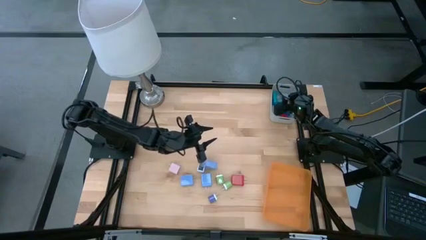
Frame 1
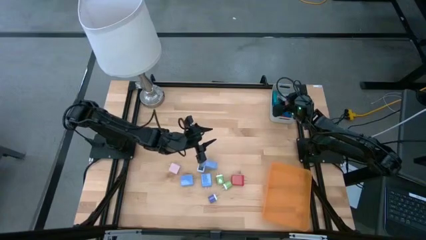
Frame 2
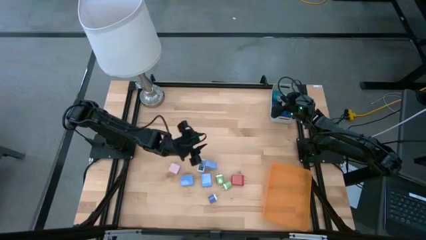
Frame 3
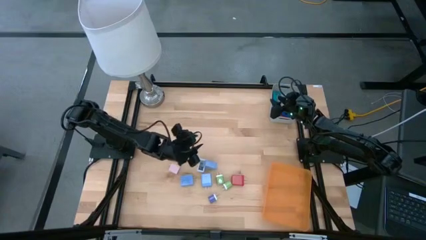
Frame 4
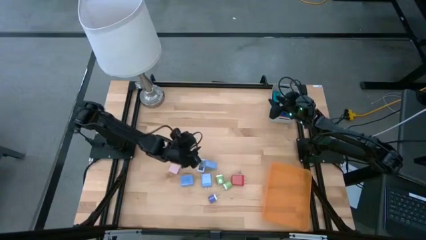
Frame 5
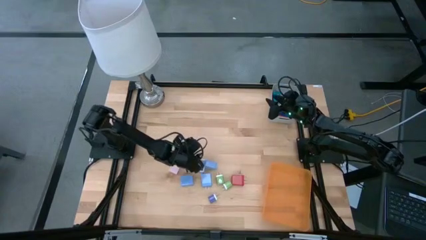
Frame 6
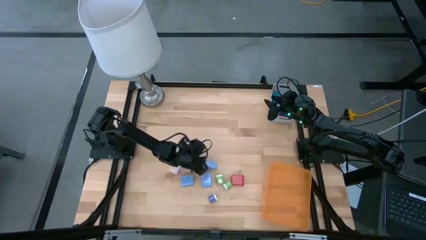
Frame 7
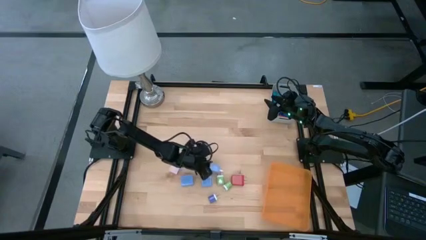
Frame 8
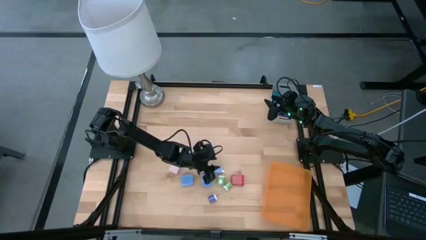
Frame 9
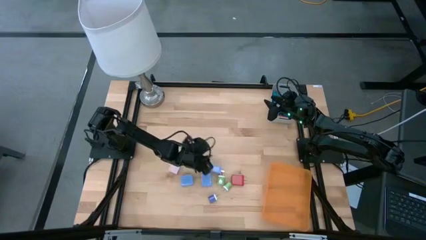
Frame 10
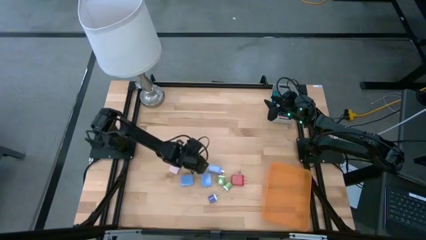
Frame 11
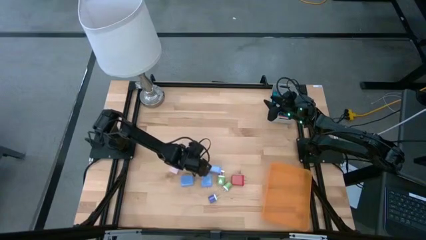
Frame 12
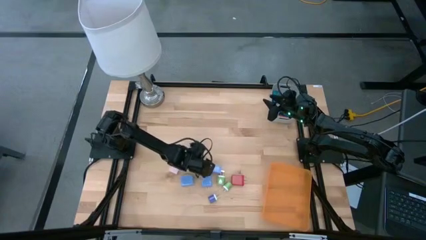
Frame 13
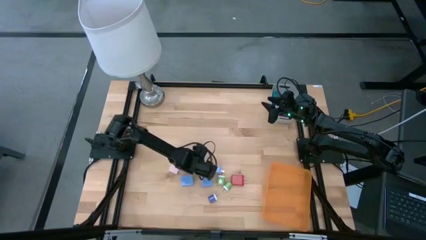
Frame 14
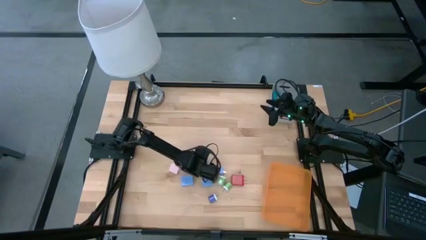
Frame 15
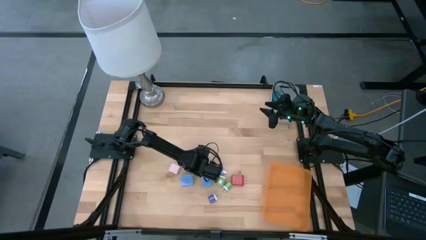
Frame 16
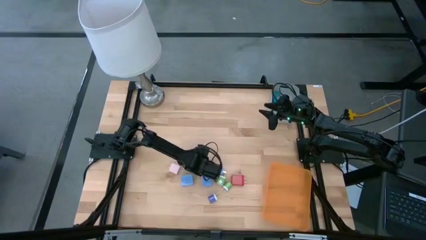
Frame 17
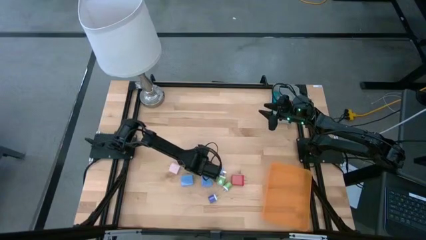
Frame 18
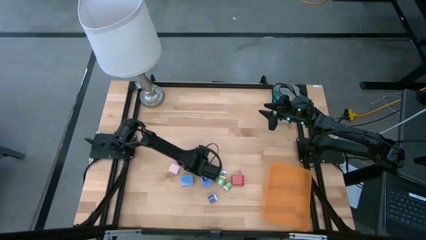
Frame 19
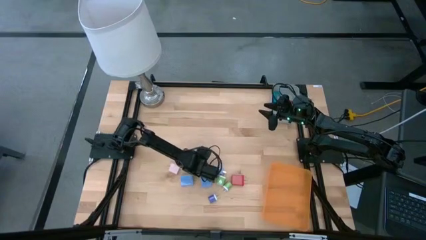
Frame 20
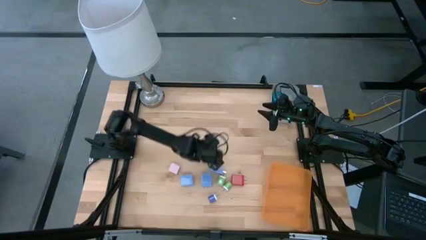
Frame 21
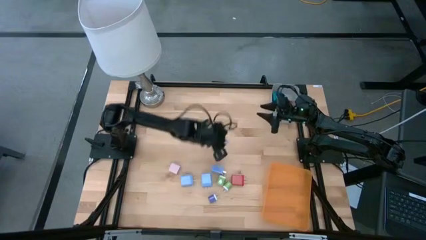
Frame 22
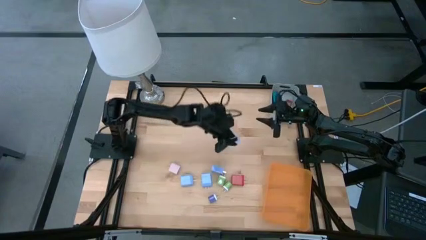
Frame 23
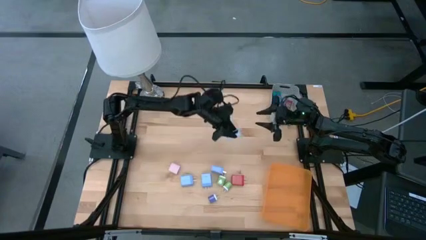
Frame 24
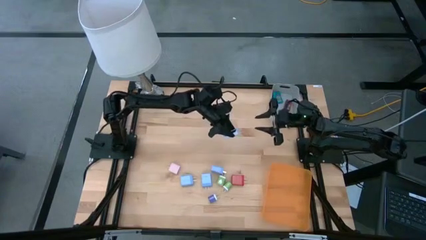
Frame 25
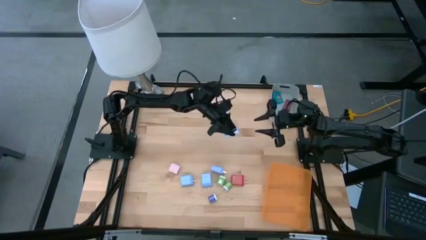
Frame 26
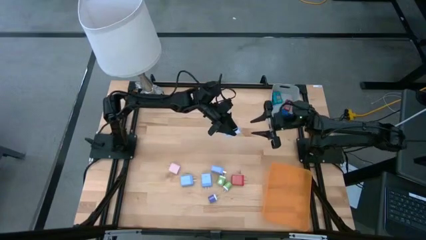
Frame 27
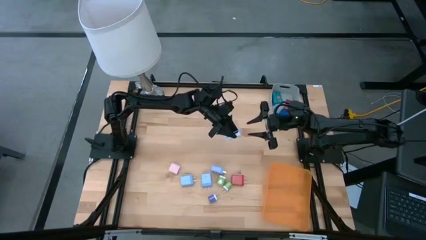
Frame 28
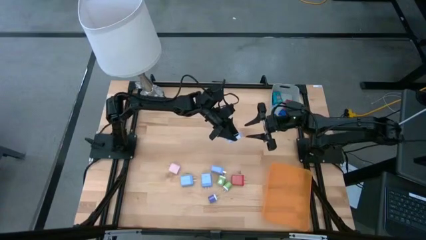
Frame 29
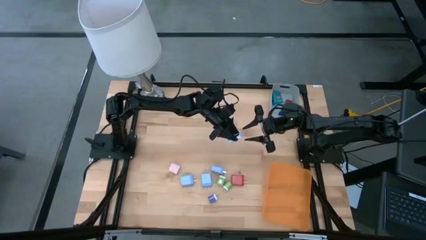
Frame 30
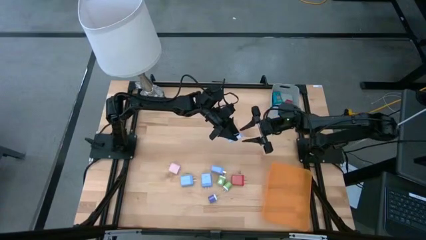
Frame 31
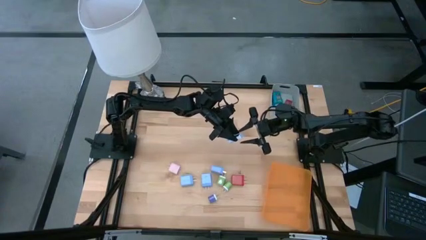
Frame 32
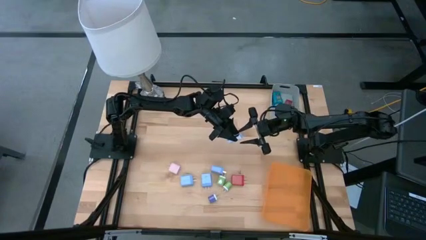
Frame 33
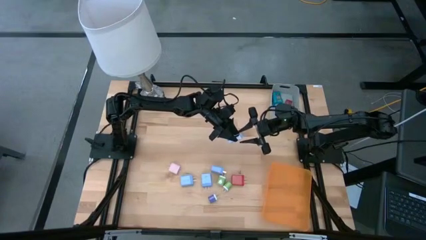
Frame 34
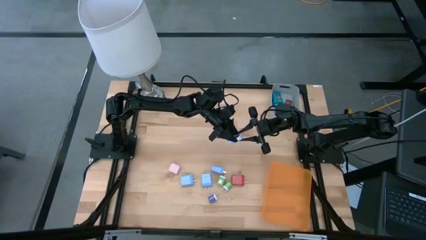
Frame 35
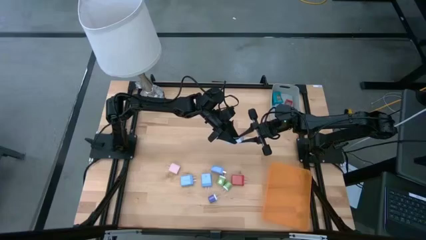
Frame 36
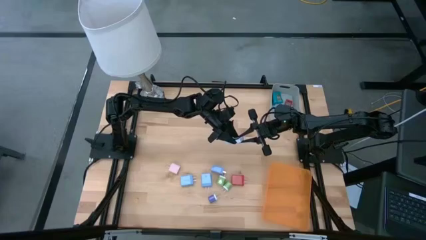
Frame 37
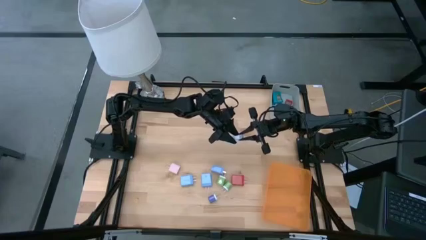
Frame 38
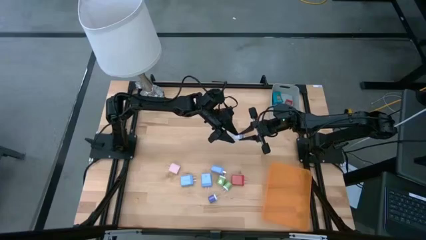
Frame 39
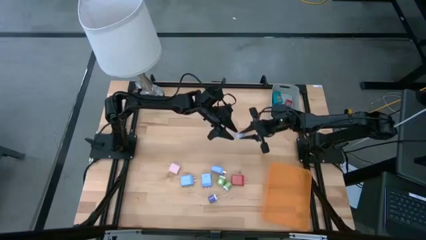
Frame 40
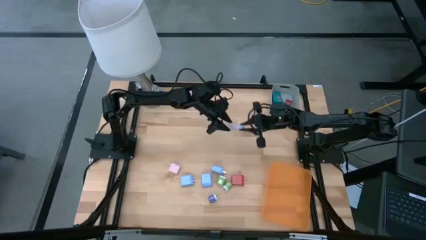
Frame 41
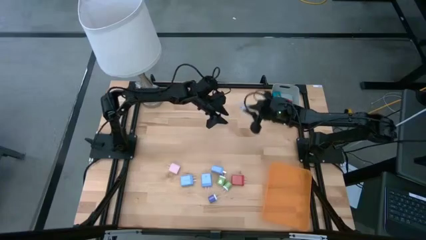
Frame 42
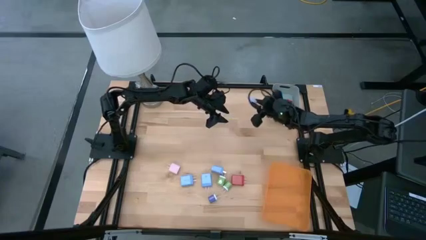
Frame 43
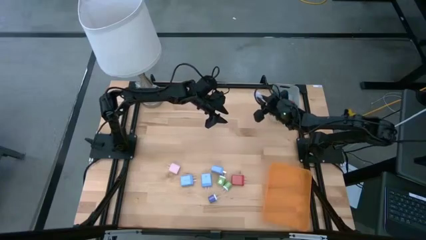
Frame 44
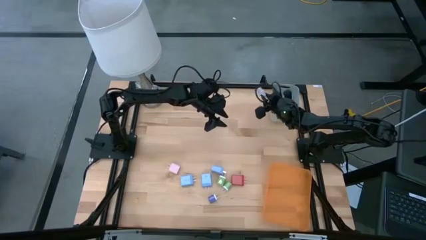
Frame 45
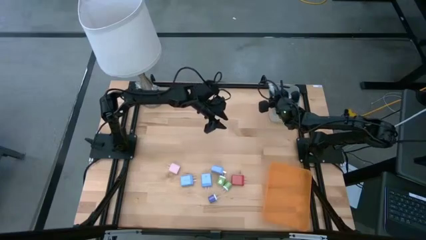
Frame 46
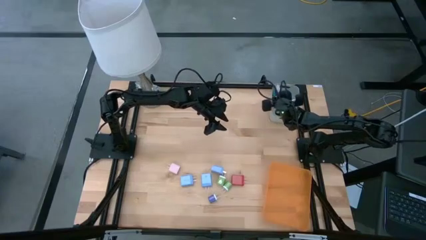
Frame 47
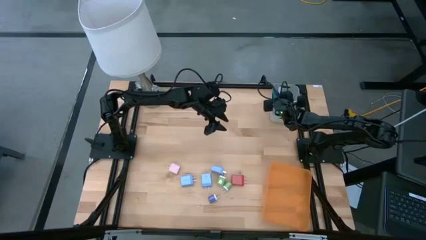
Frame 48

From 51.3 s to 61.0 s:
Task: Pick & Place Office items
Put the white digital clock into the gray bin

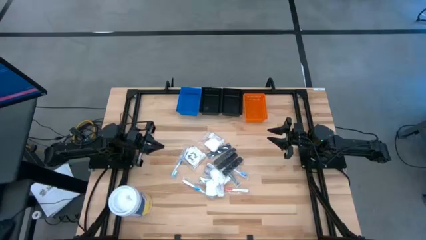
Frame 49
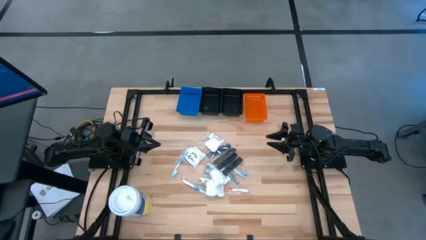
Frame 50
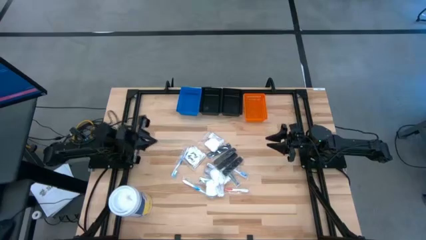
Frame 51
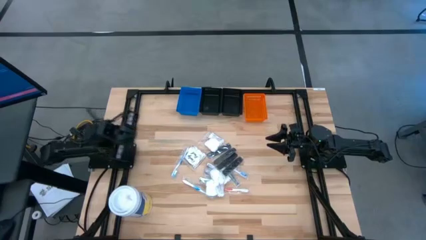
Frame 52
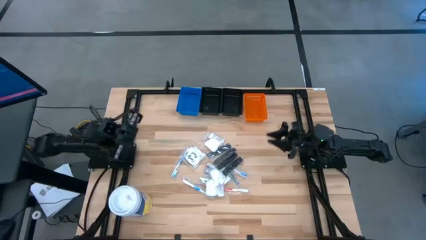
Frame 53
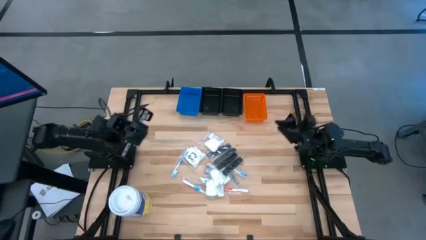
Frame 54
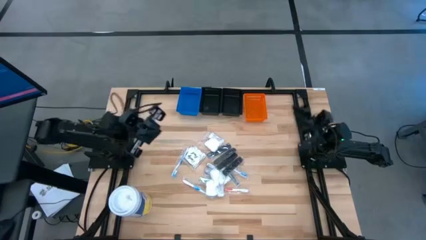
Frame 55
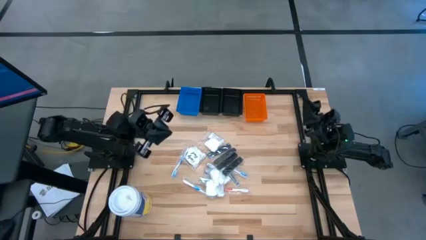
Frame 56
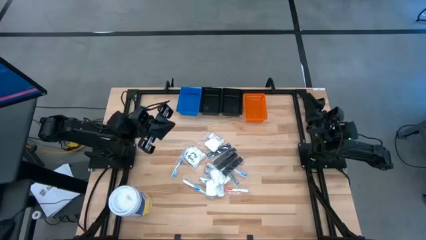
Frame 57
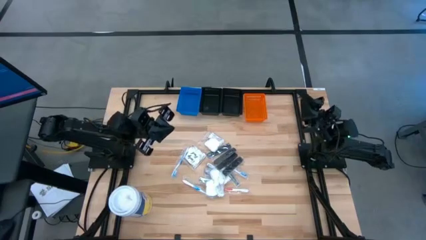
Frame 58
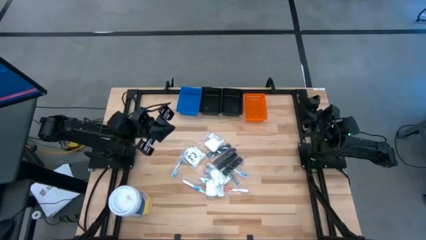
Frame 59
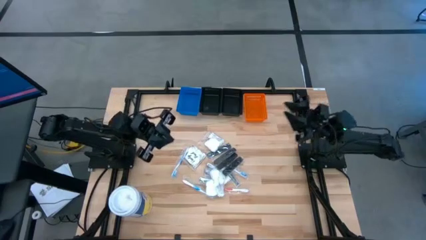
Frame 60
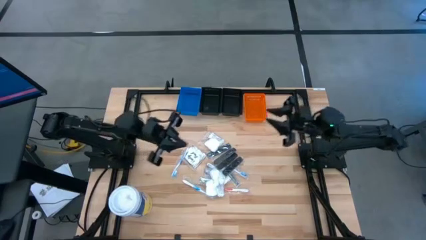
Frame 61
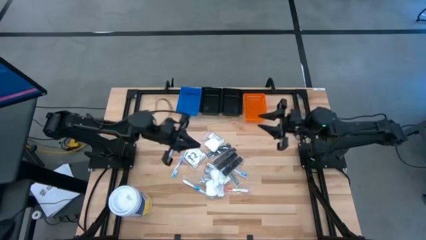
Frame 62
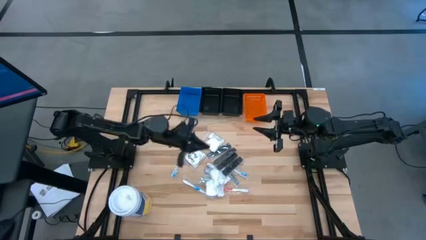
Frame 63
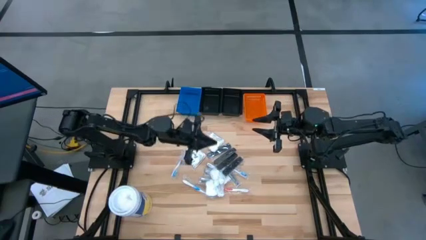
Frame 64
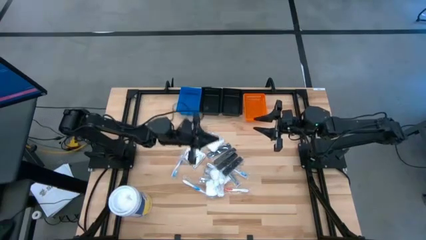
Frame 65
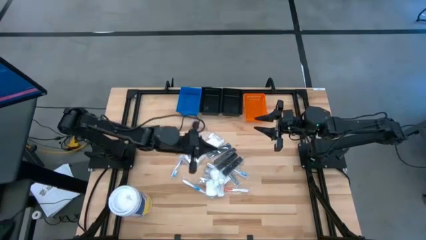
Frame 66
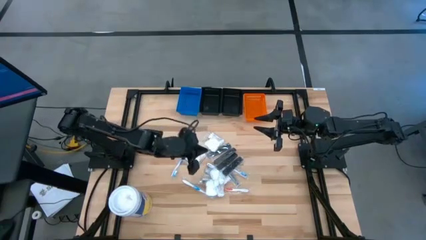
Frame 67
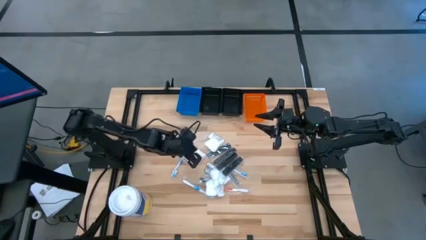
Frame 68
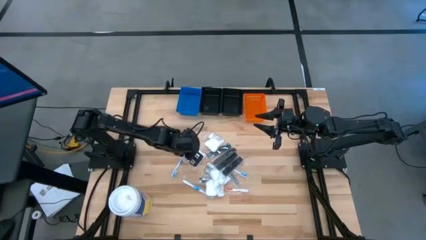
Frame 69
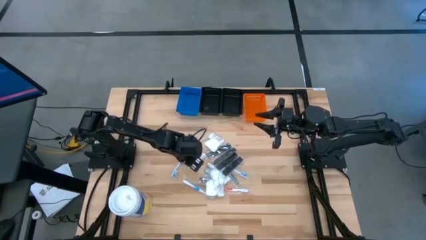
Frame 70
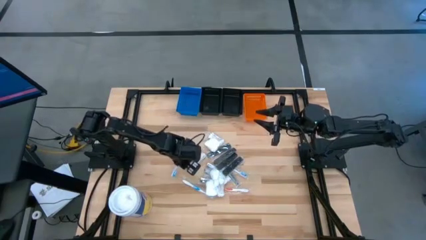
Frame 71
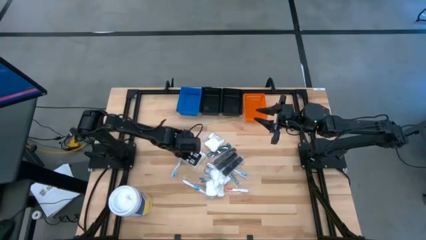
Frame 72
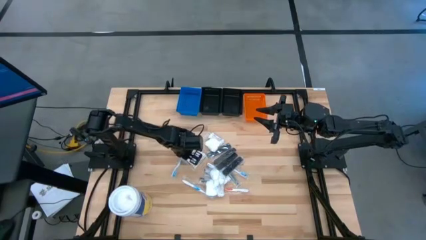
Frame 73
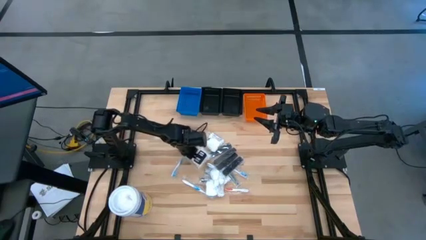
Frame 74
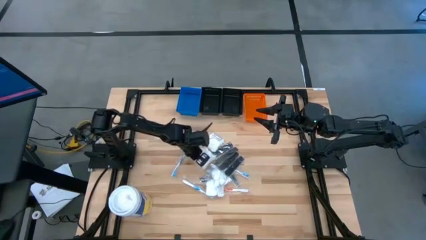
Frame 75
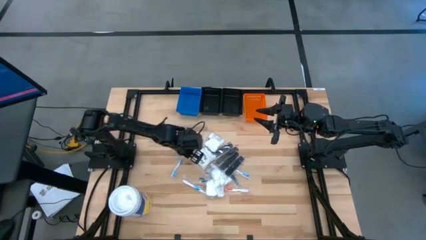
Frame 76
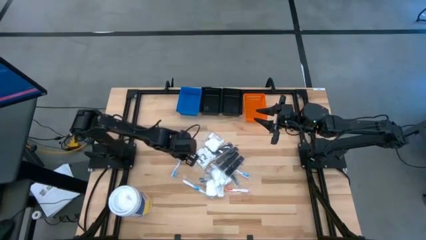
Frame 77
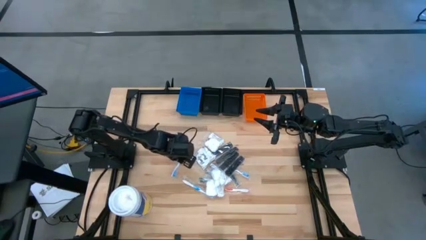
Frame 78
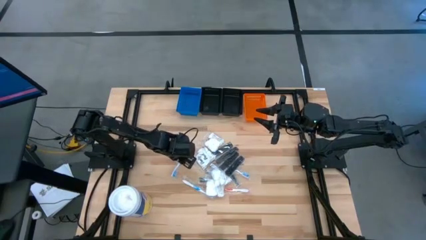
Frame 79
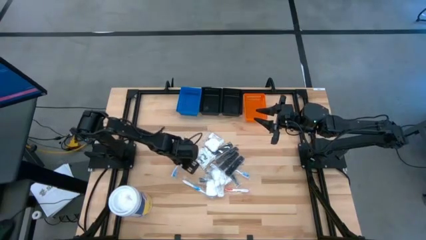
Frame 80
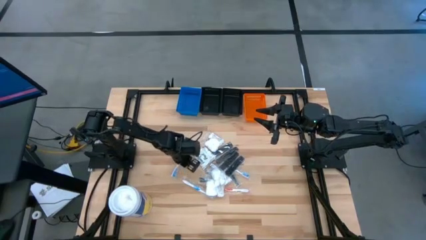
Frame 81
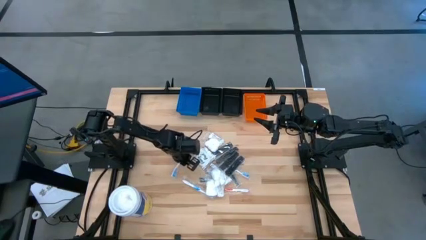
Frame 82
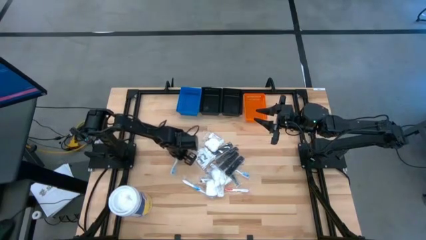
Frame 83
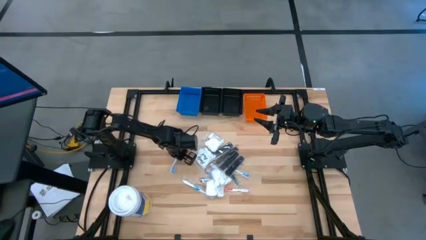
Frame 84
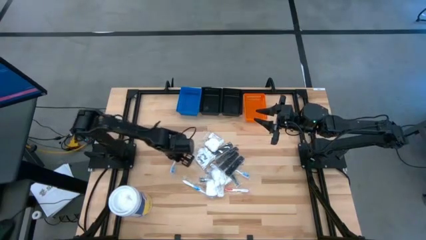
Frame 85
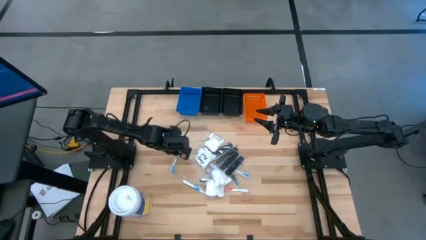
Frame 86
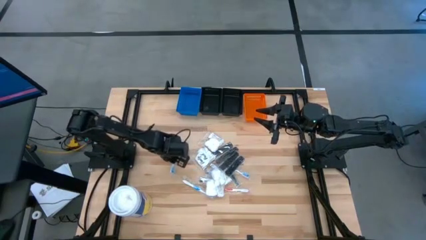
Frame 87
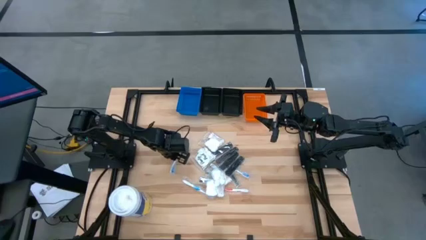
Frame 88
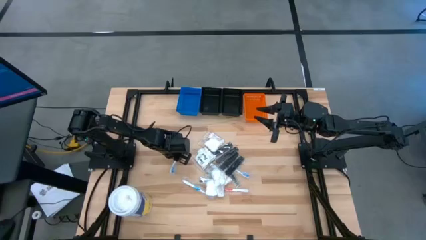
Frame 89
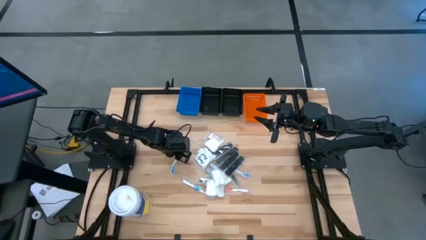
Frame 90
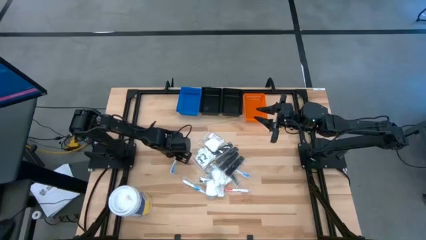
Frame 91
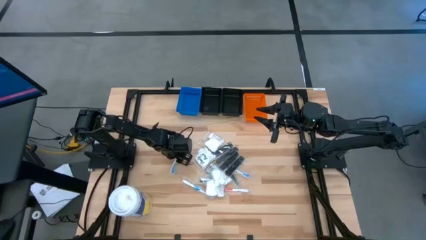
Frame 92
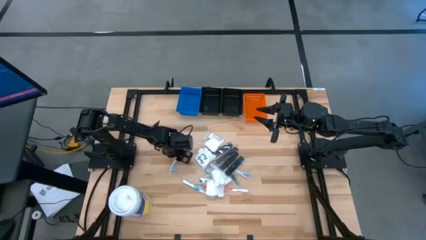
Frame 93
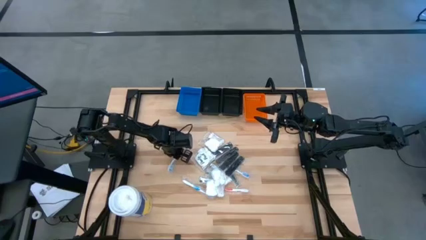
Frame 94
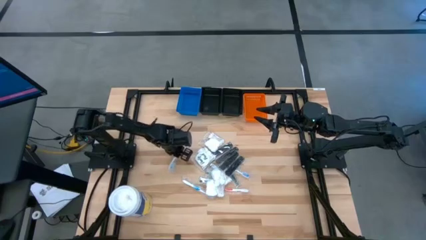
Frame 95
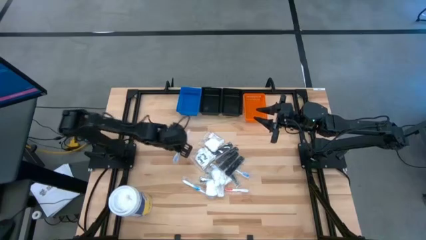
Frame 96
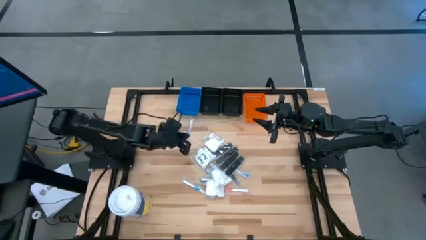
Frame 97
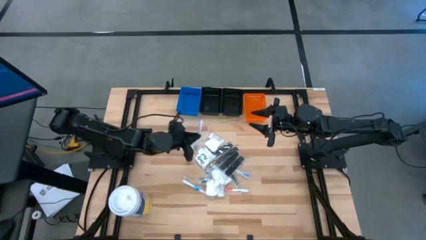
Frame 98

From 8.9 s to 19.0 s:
Task: Pick & Place Travel size toiletries
Put the blue toothbrush into the orange bin
